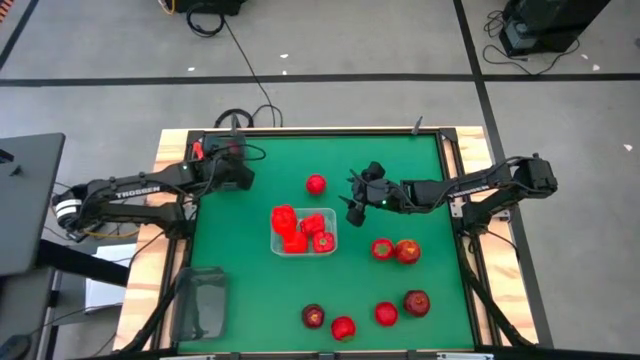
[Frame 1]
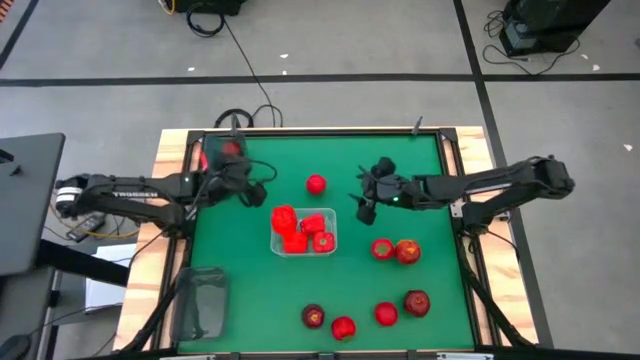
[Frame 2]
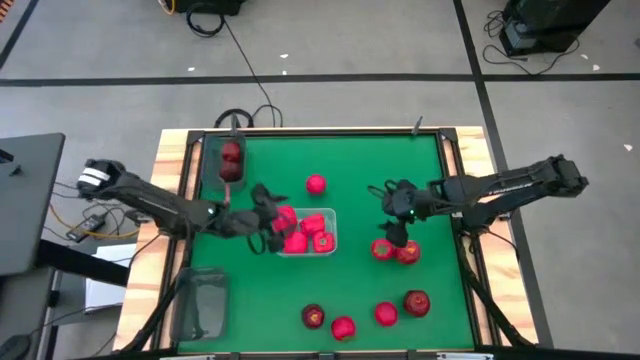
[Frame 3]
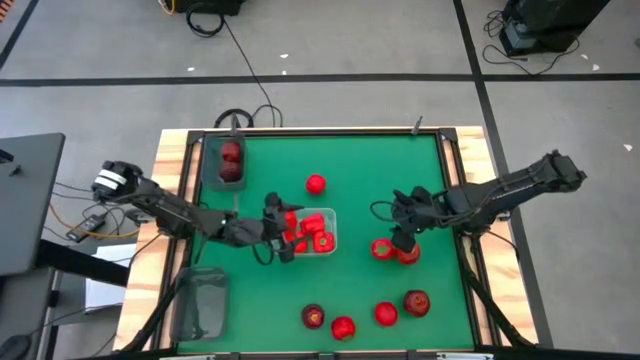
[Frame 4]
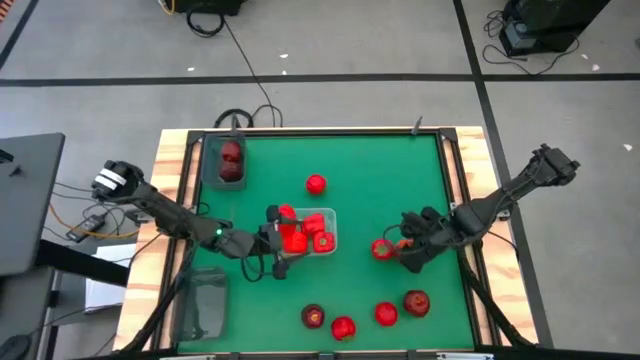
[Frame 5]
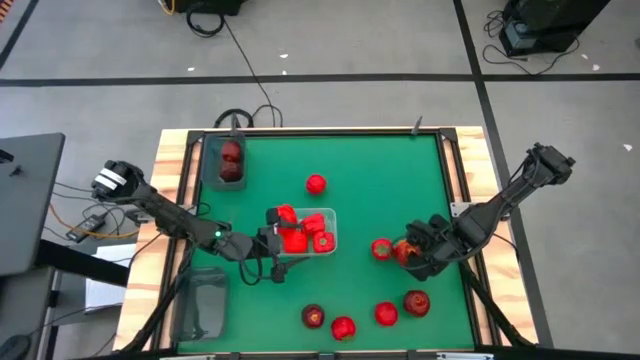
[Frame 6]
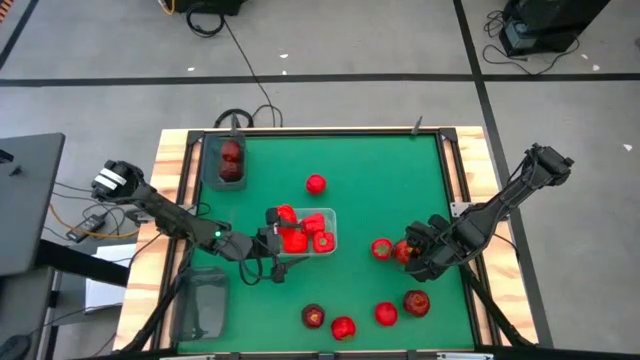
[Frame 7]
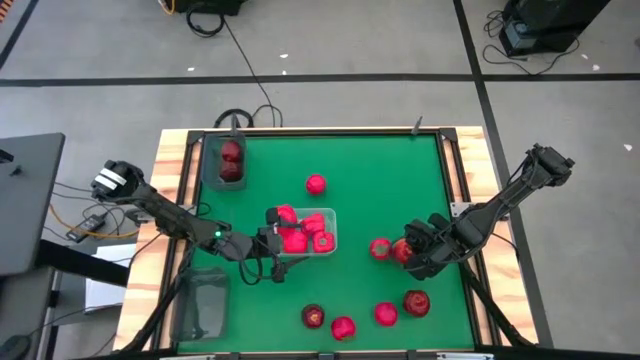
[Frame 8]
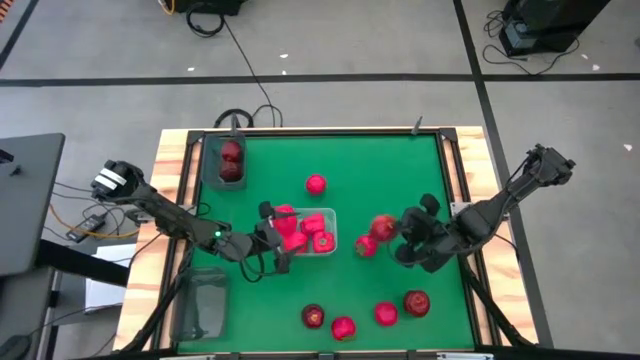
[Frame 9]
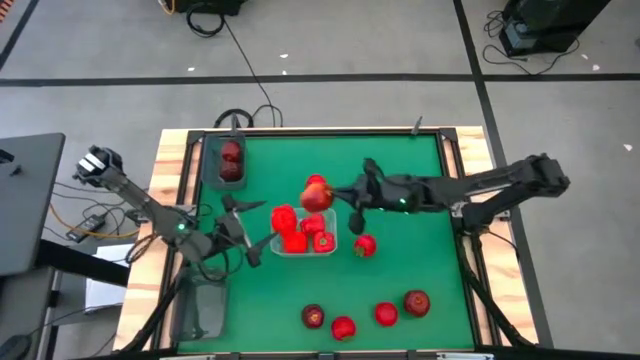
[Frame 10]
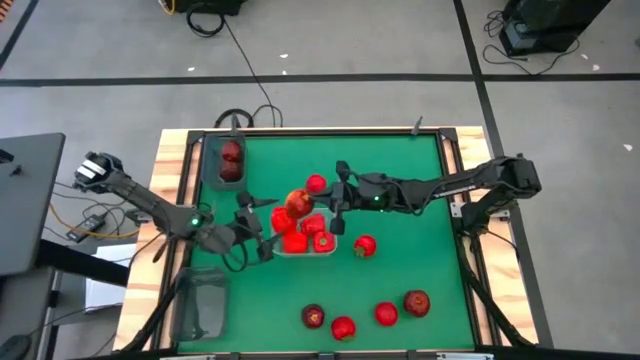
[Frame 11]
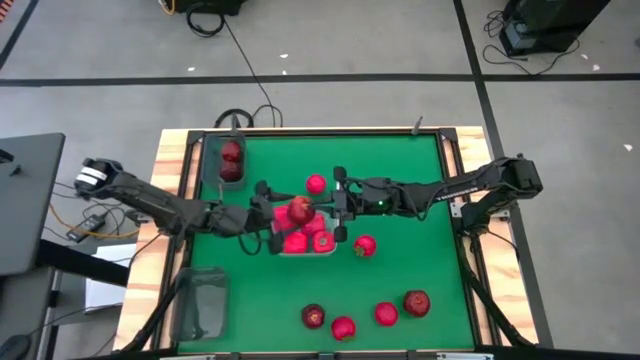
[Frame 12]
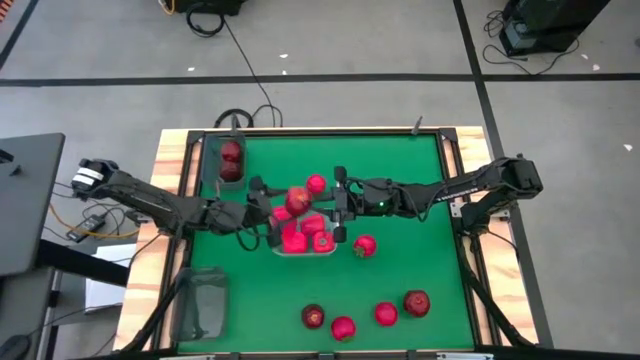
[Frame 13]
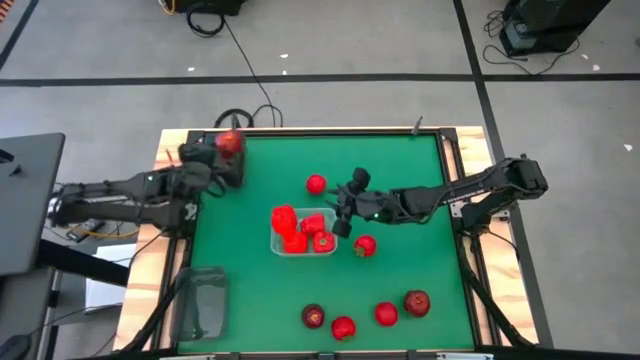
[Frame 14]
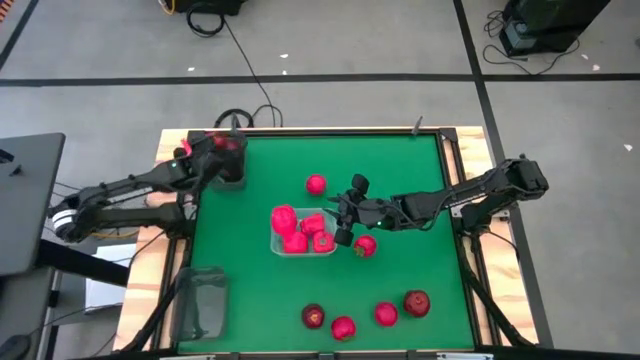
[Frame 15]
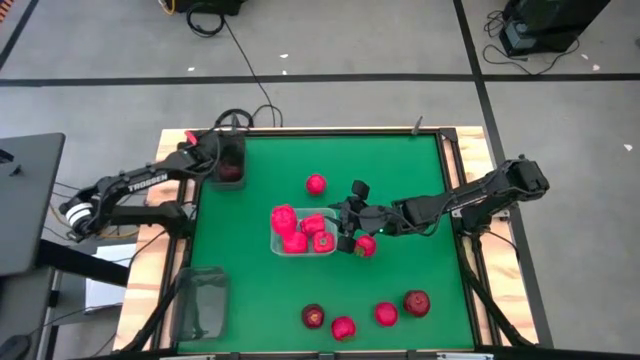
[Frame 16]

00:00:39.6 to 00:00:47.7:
Task: Sort produce into baskets
Put the red apple into the top black bin

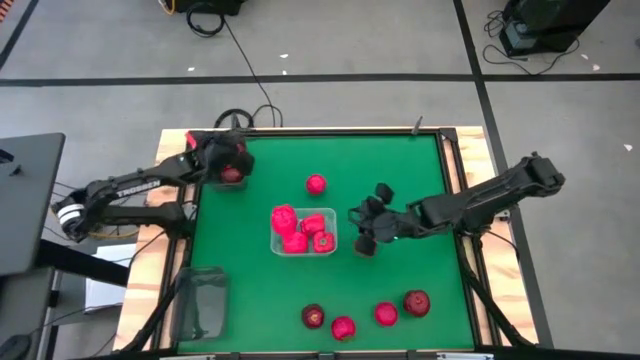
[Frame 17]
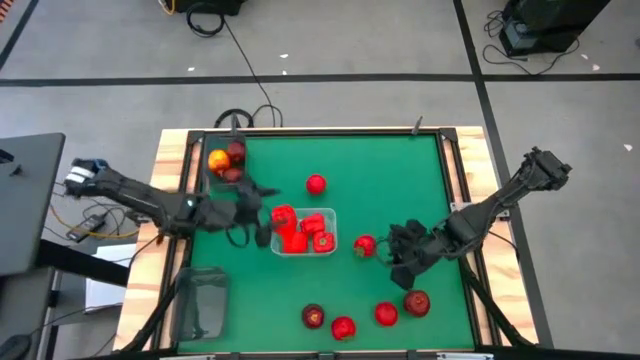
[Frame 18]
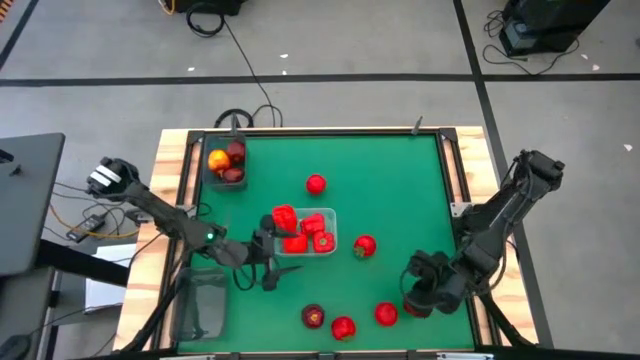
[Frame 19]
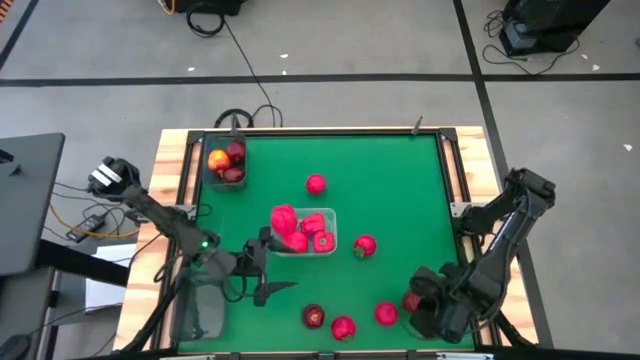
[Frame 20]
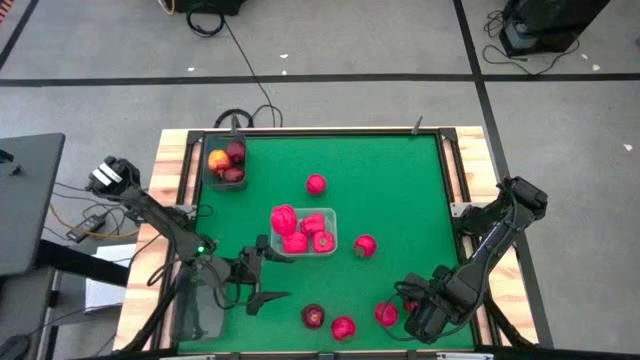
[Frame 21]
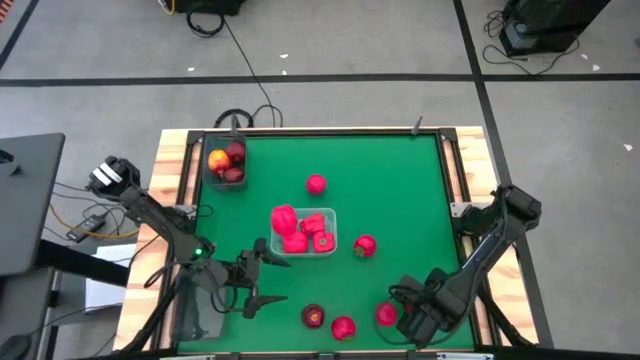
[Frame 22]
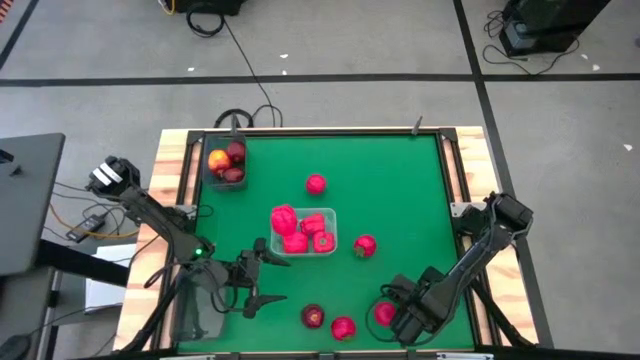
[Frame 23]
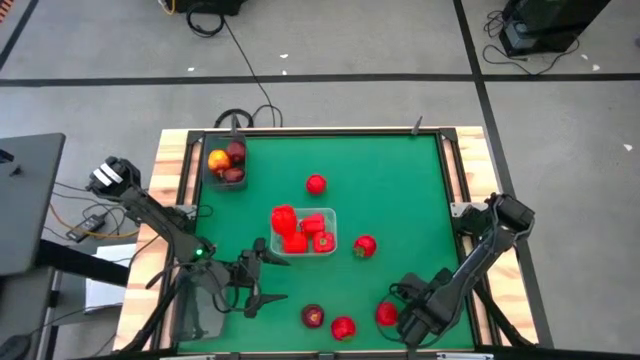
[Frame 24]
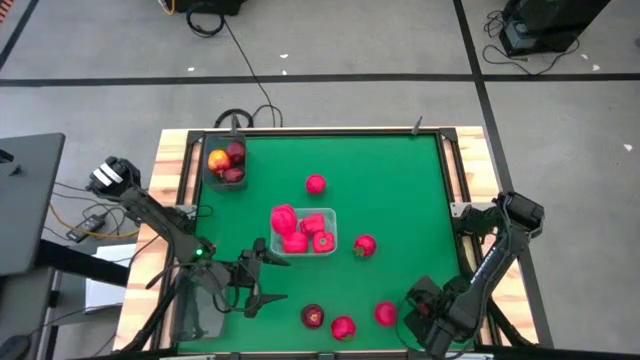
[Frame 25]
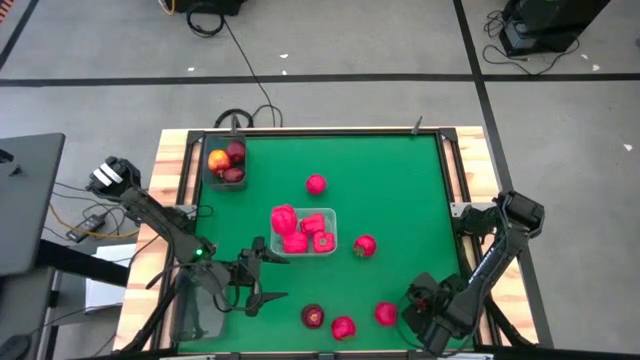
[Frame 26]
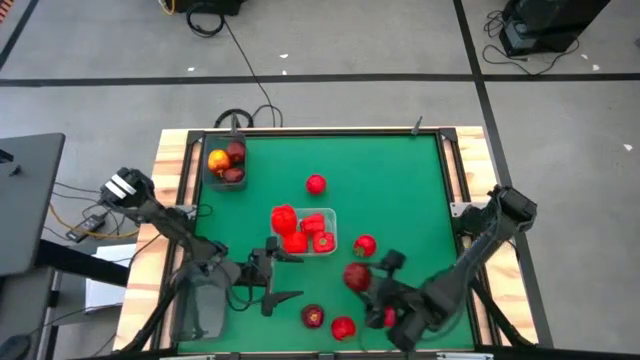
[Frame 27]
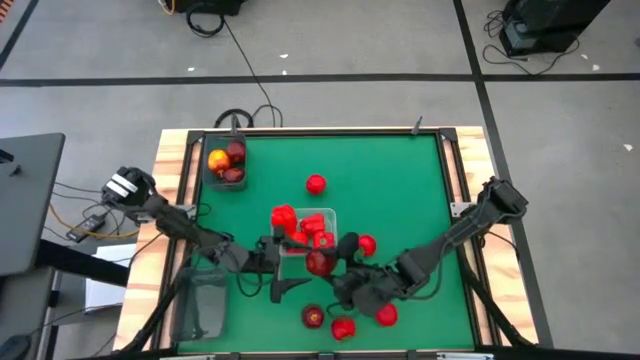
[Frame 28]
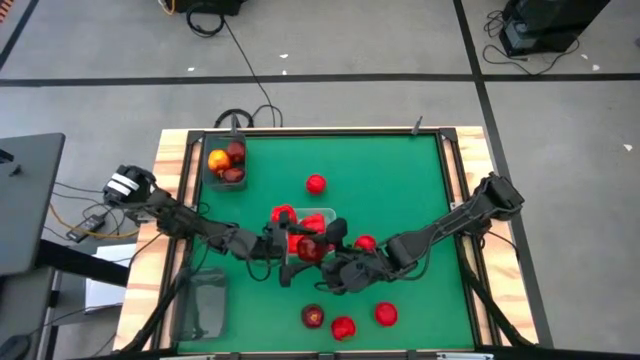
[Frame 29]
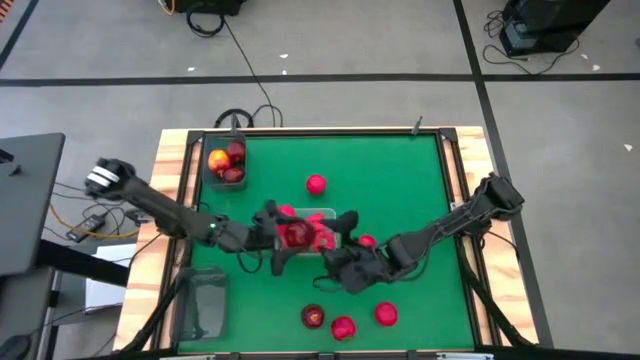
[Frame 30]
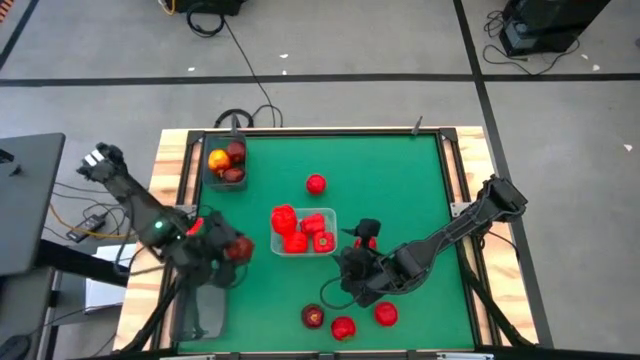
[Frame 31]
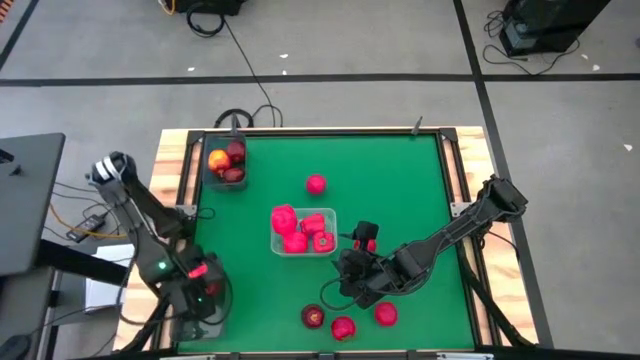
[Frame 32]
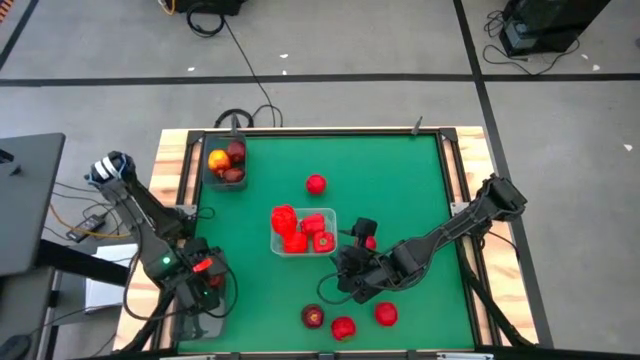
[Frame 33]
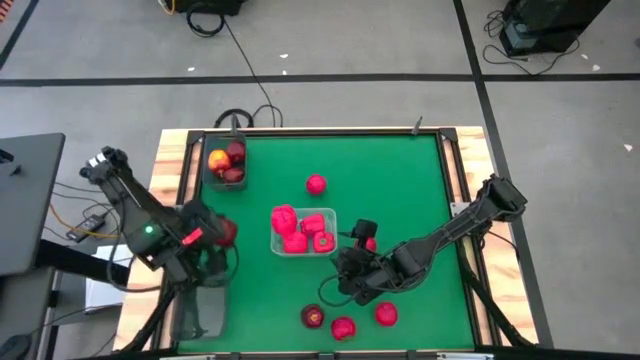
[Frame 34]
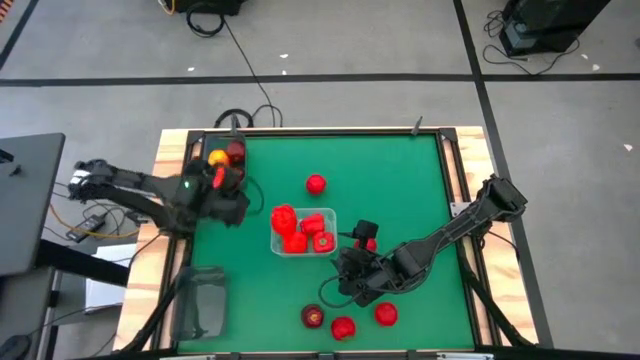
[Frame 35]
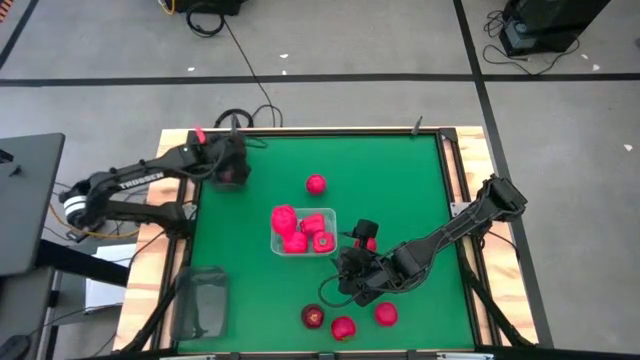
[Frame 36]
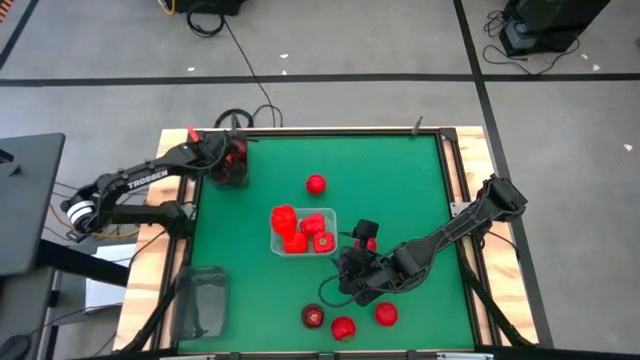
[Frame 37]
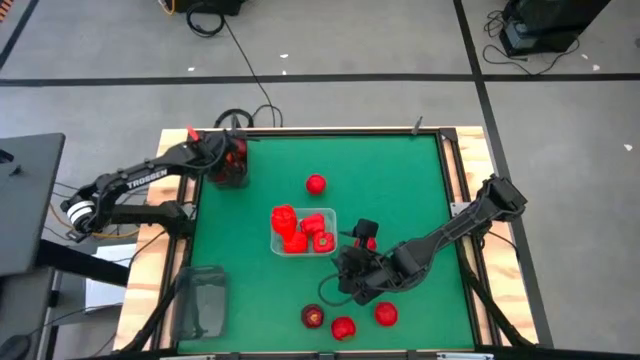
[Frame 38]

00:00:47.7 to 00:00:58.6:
Put the red apple into the top black bin

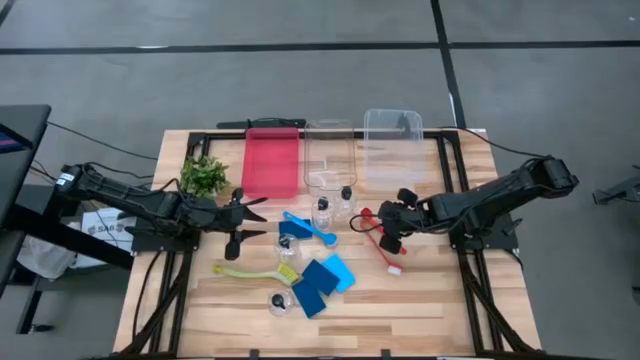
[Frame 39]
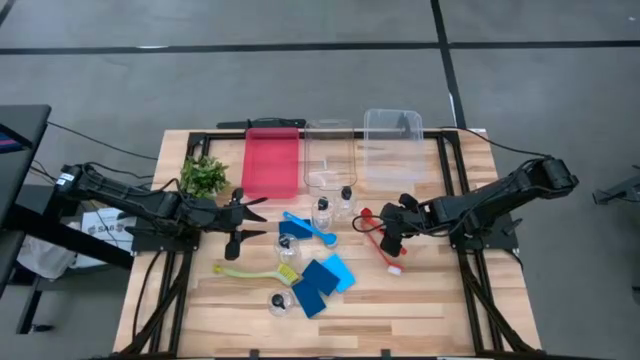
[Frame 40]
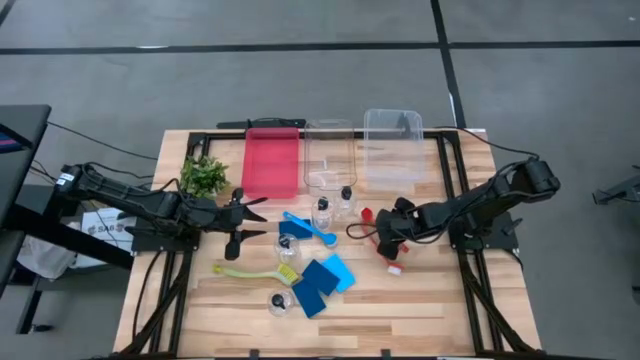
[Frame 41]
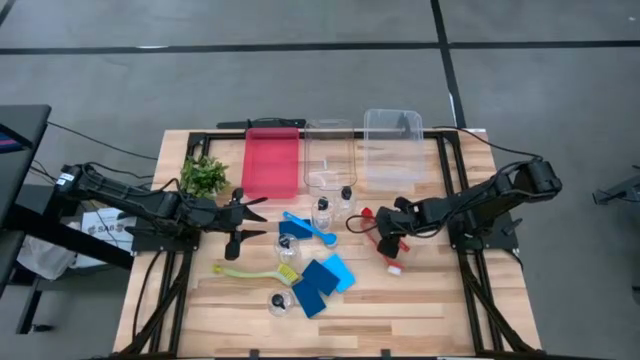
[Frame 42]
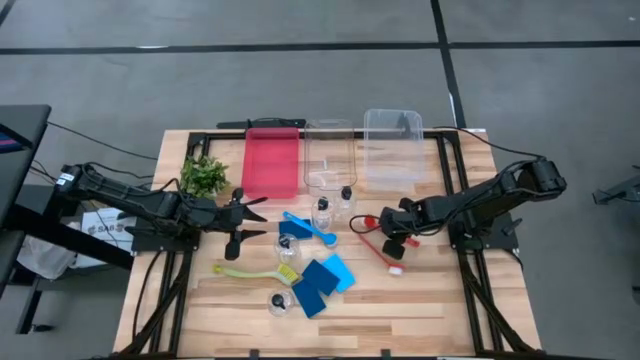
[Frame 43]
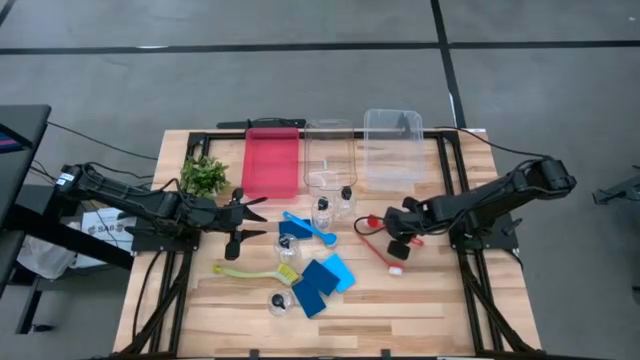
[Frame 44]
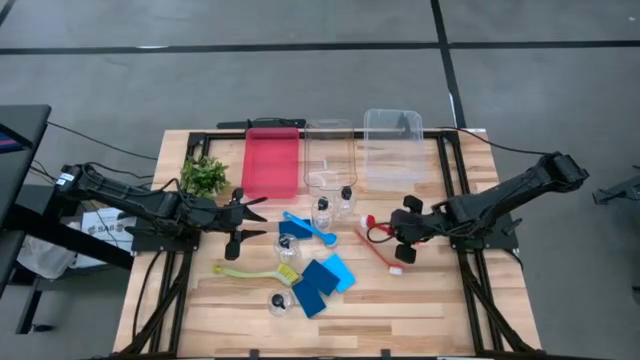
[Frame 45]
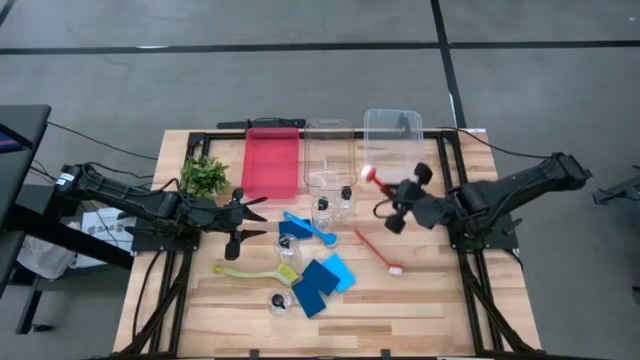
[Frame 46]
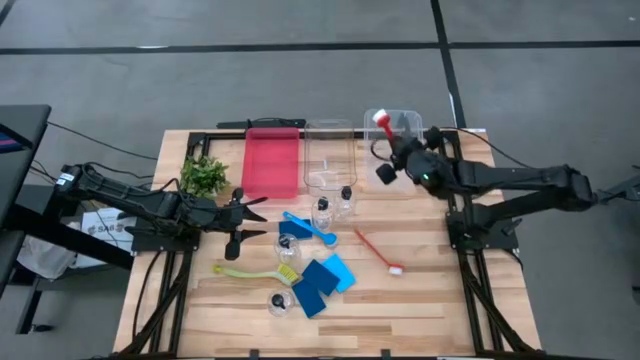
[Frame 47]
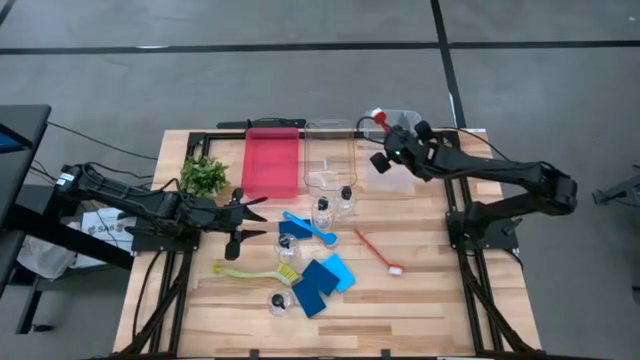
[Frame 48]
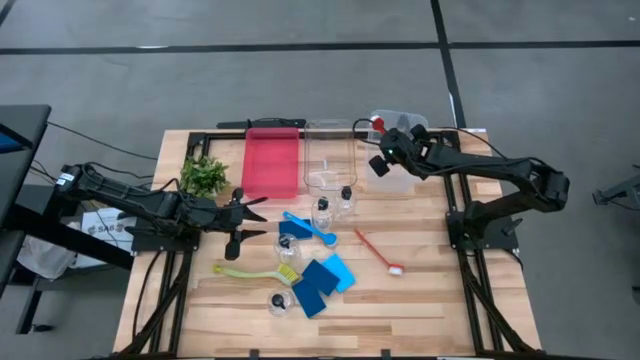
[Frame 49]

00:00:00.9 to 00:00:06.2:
Task: Pick & Place Kitchen Sink Supplies
Put the red dish brush into the right transparent bin
